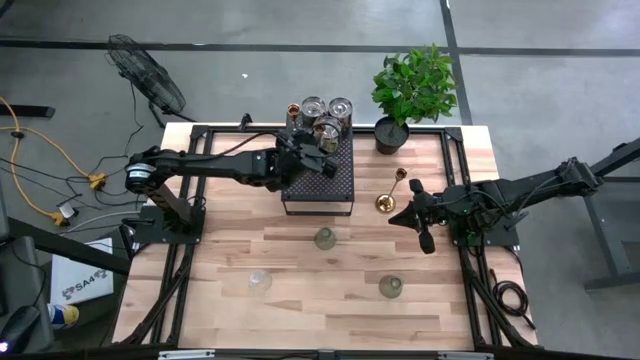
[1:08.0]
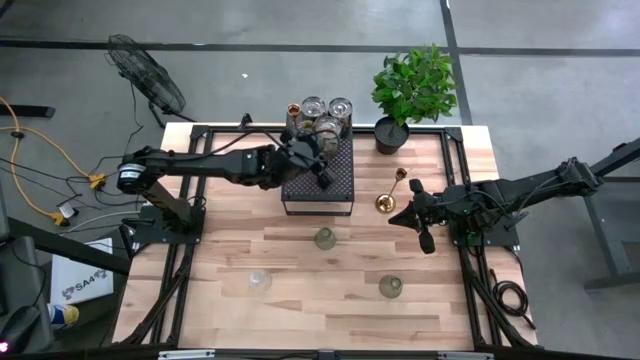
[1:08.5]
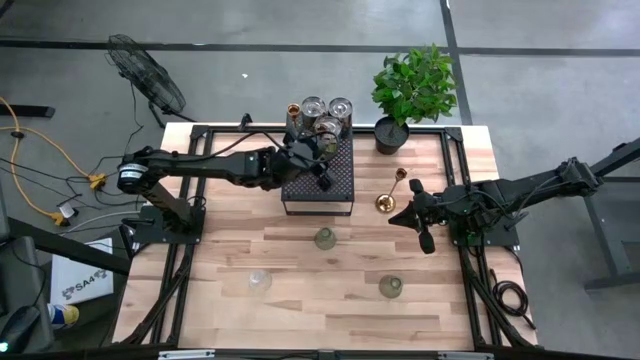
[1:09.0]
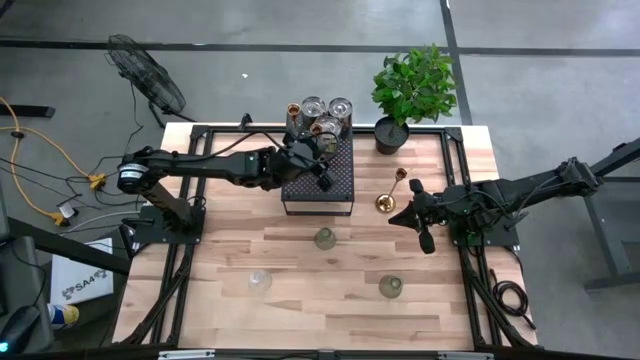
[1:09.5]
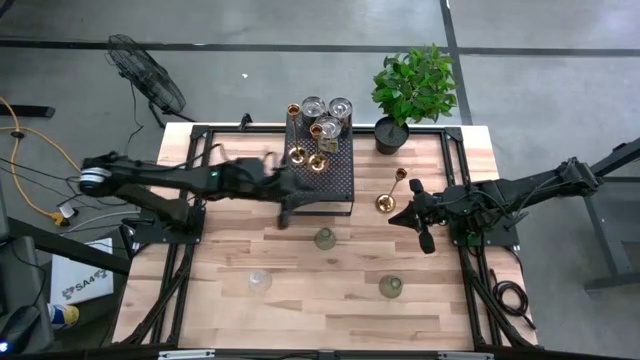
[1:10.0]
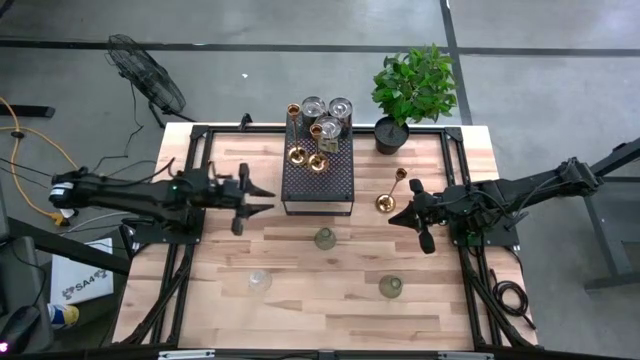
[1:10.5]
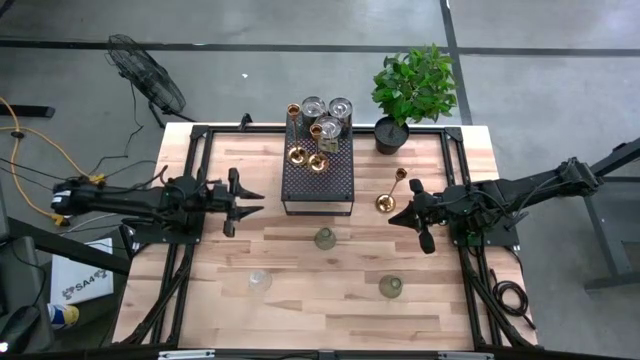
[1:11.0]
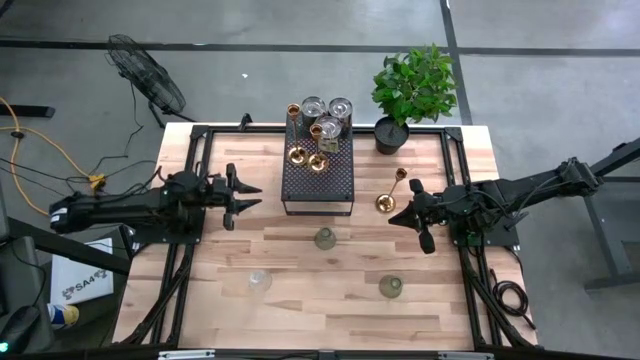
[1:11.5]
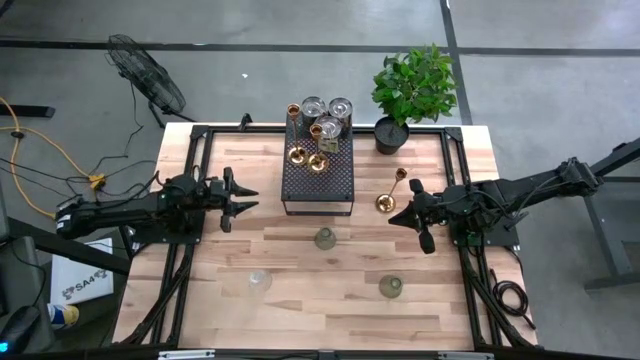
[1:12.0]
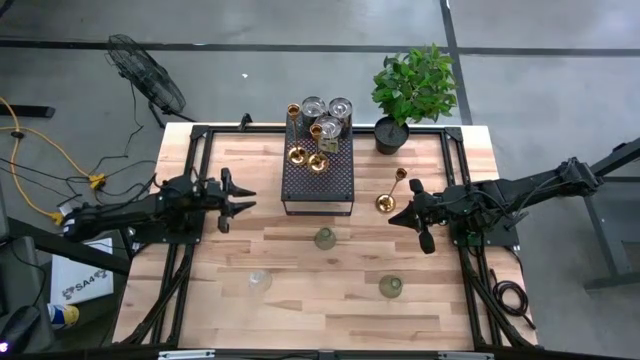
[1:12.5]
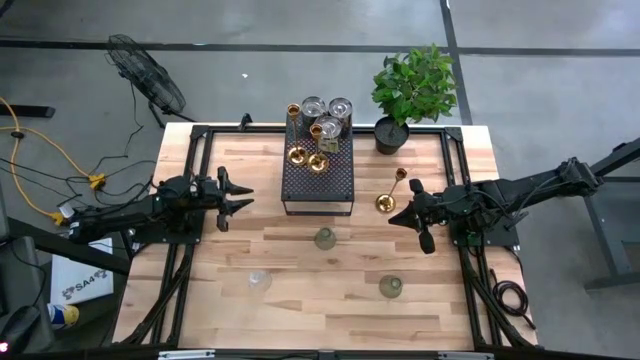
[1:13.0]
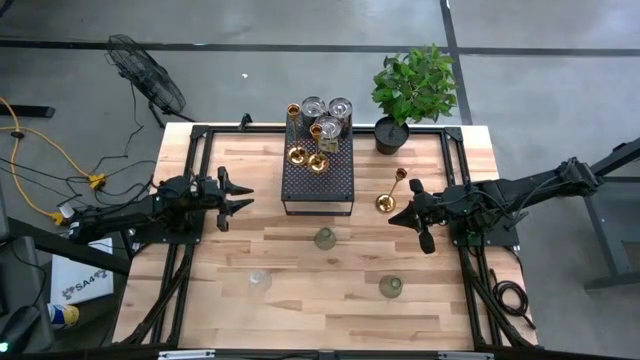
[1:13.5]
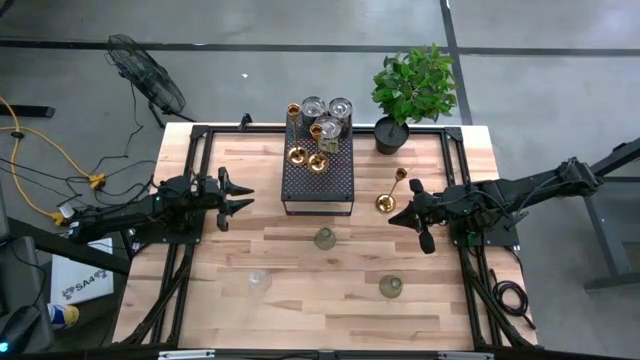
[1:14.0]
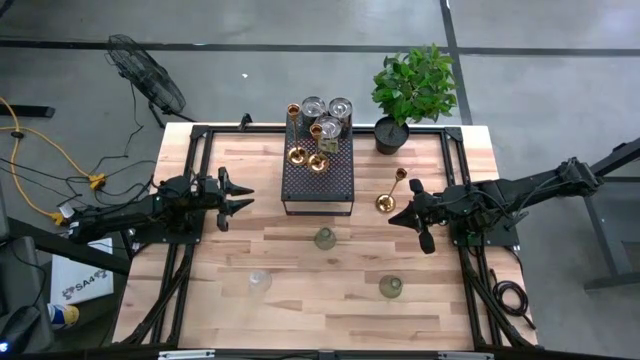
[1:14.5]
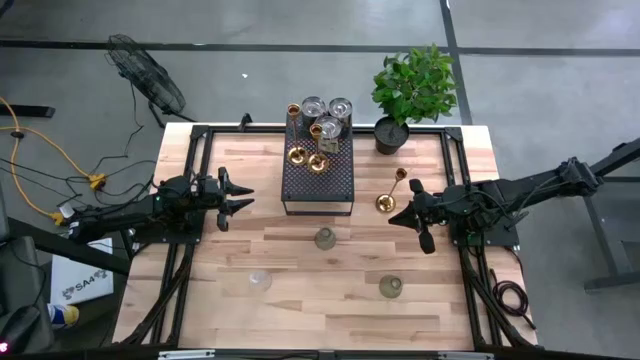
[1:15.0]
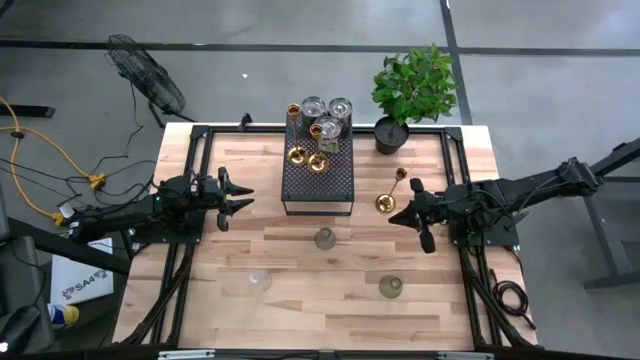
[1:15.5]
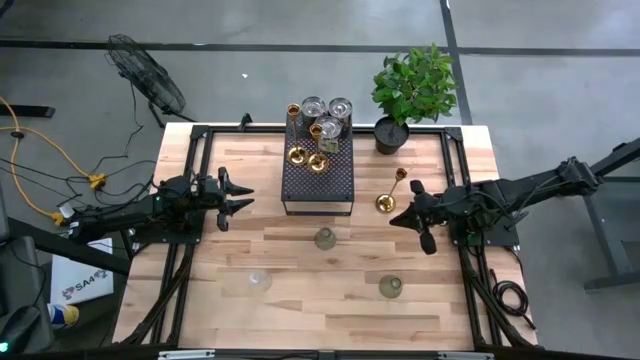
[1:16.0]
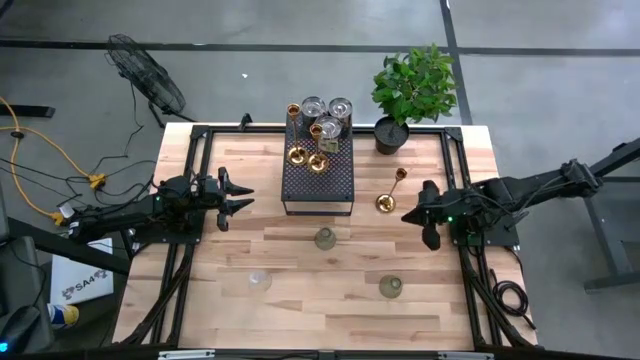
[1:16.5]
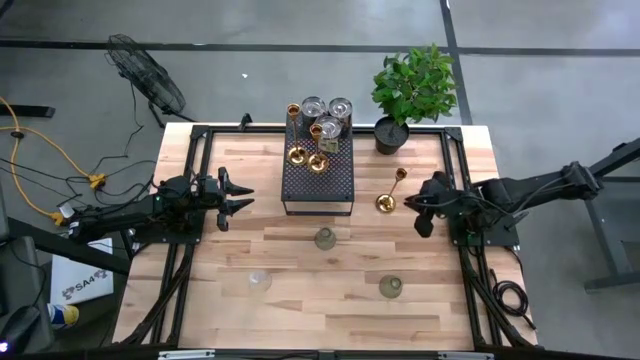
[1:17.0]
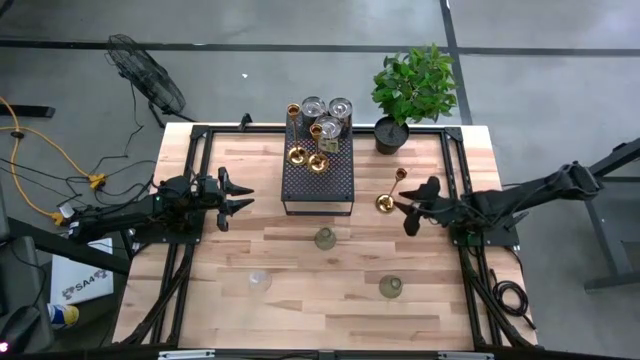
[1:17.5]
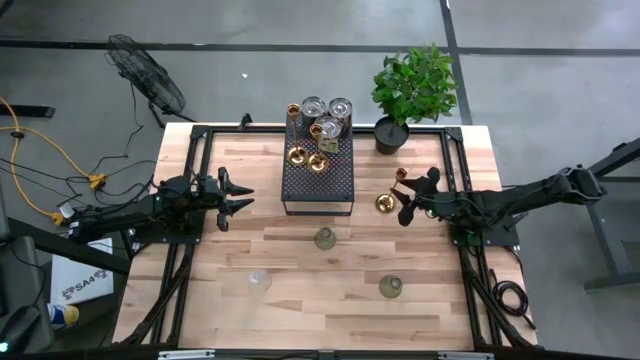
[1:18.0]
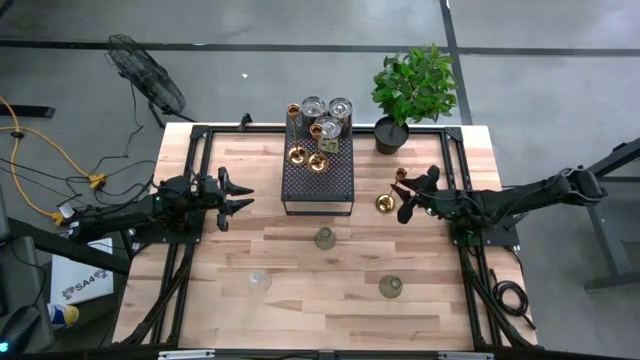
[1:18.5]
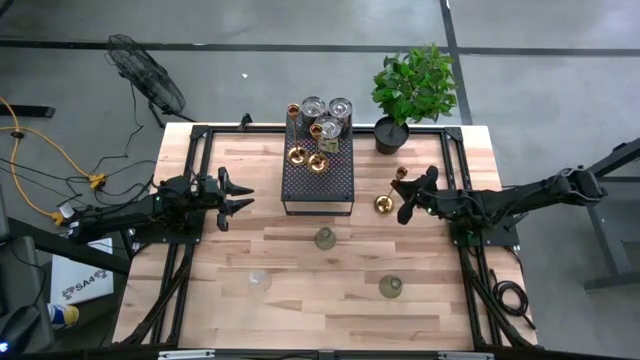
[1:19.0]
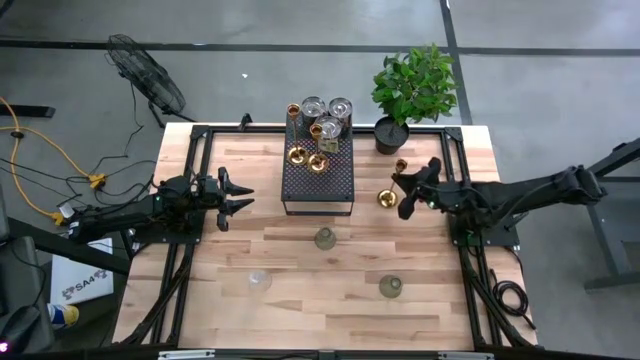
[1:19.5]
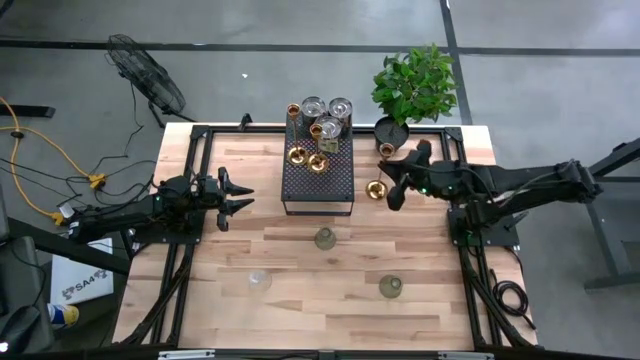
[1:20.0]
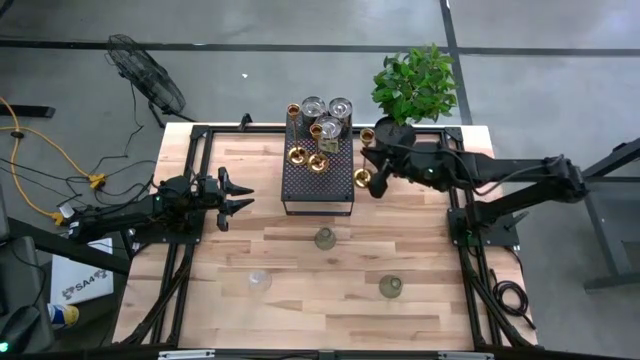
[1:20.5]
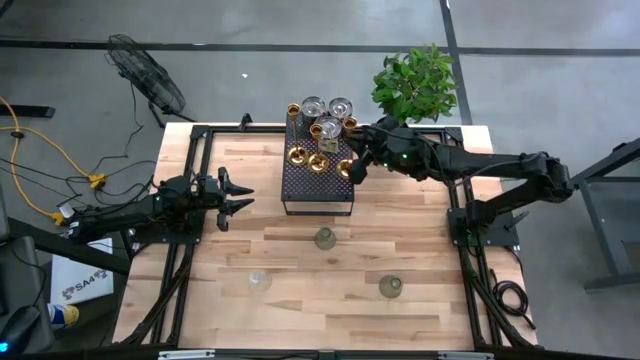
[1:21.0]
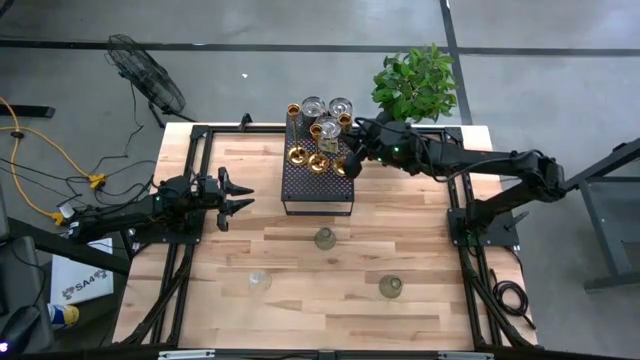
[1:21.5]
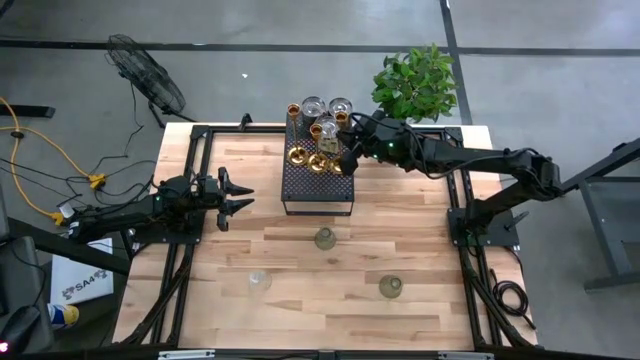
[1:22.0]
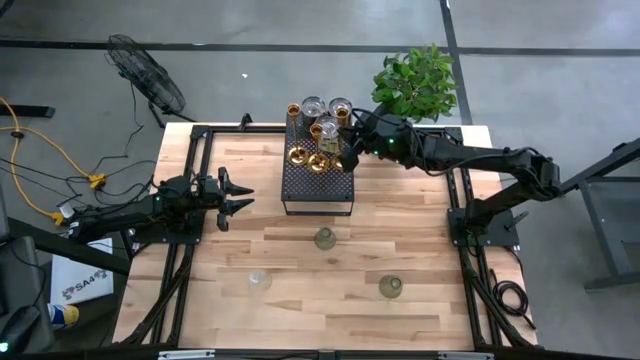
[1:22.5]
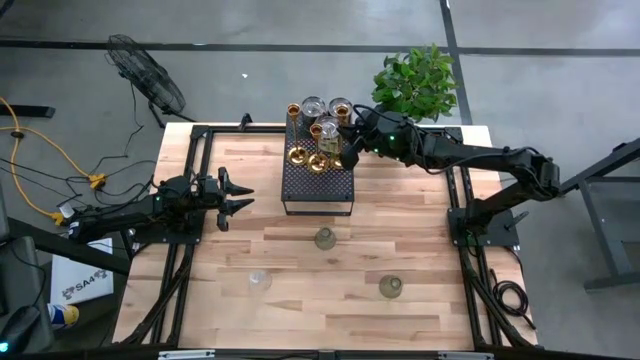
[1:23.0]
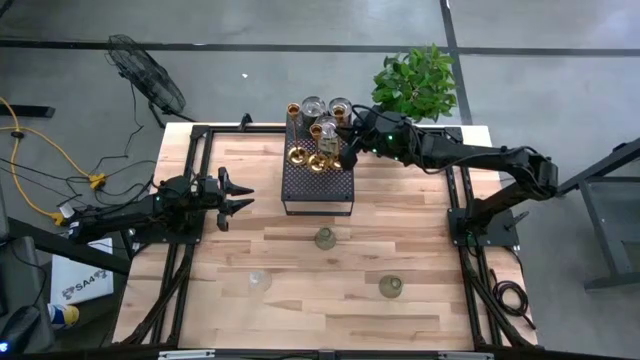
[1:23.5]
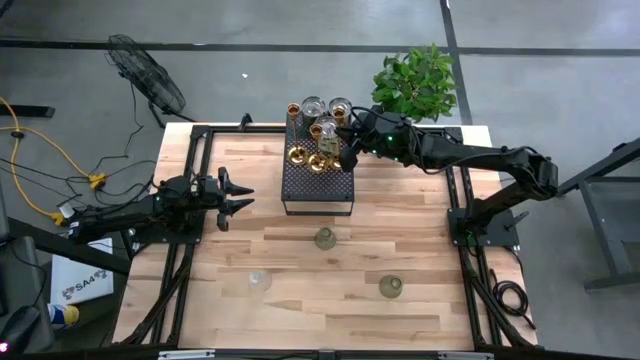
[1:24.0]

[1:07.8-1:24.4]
Task: Pick & Place candle stick holders
Put the gold candle holder on the shelf

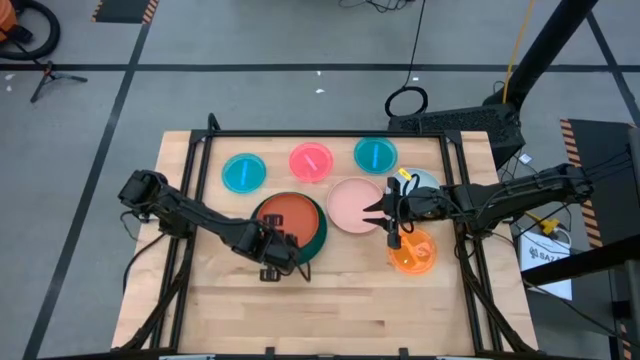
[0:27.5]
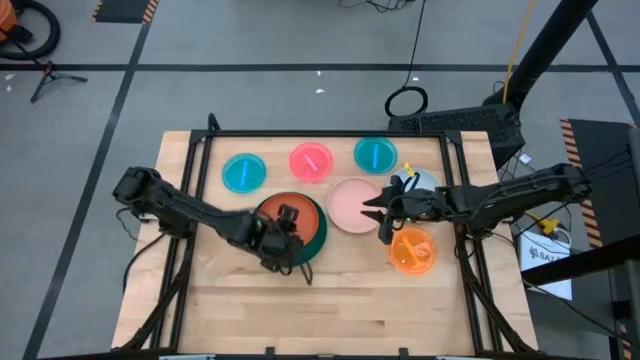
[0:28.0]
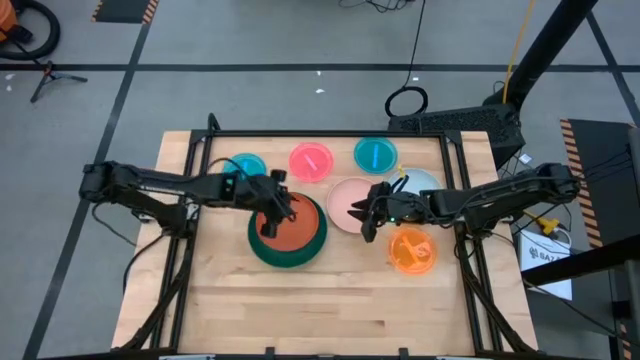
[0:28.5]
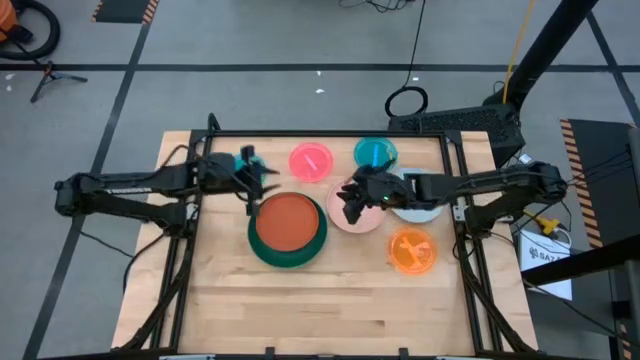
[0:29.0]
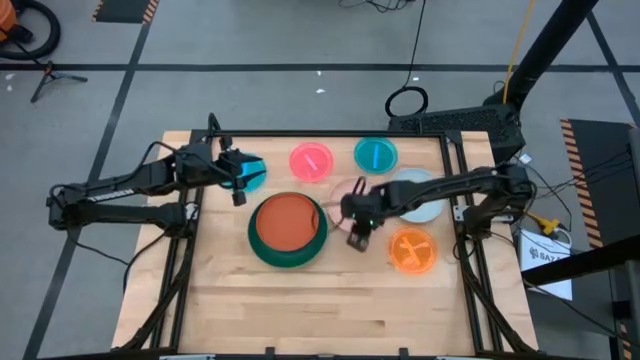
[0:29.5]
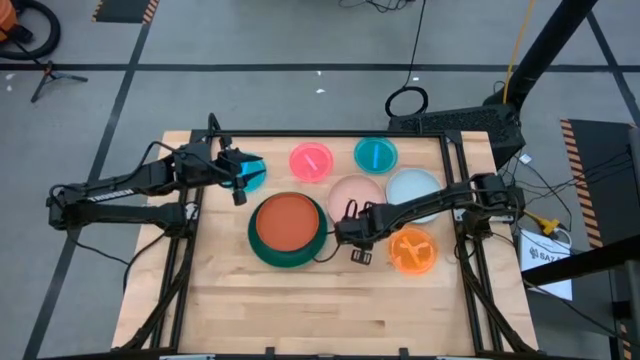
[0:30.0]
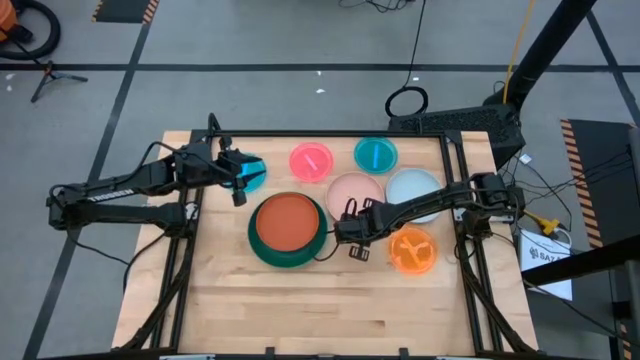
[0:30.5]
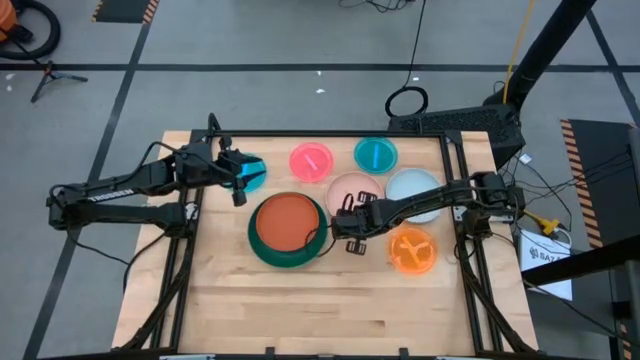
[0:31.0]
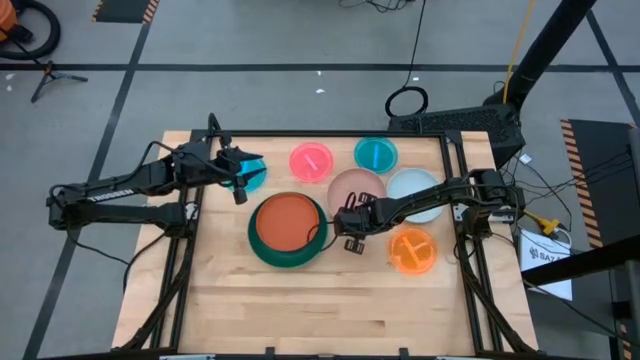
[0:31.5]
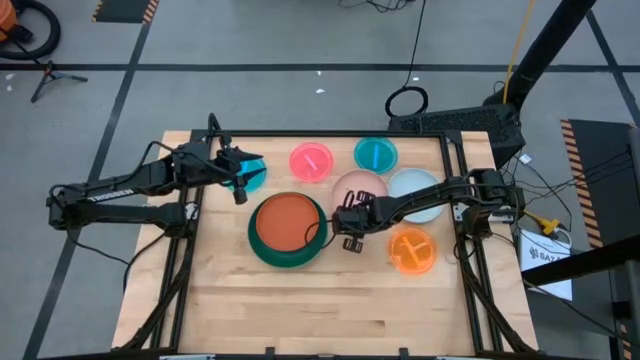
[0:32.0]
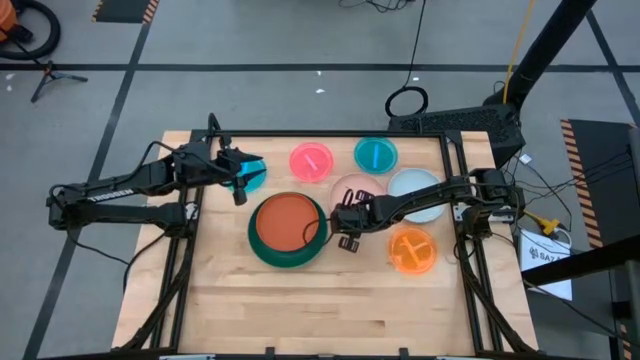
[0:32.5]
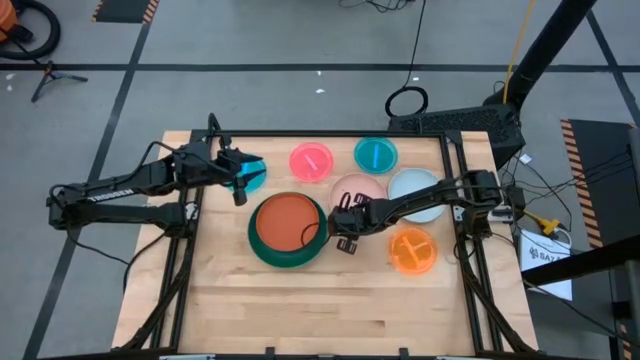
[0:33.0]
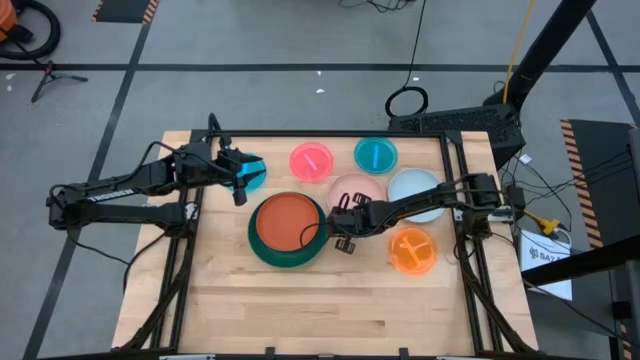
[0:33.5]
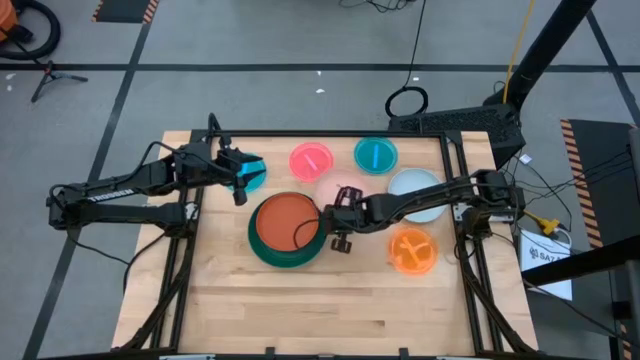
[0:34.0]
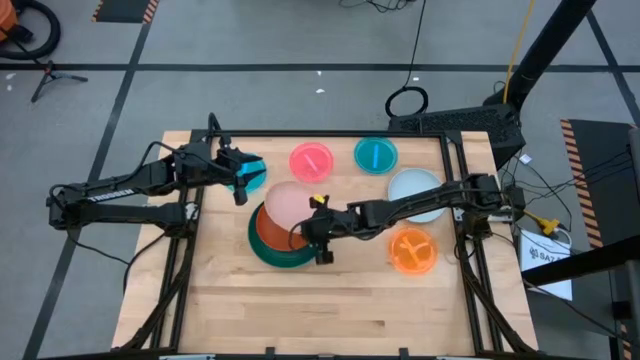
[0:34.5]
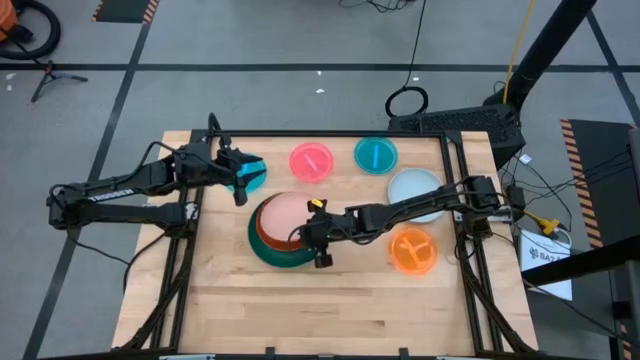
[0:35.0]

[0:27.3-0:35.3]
Task: Stack plastic plates
Stack the pink plate on top of the orange plate
